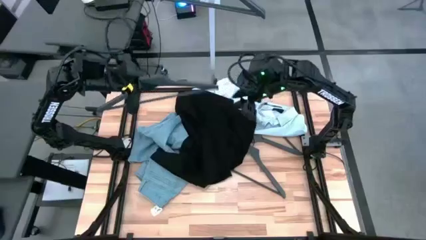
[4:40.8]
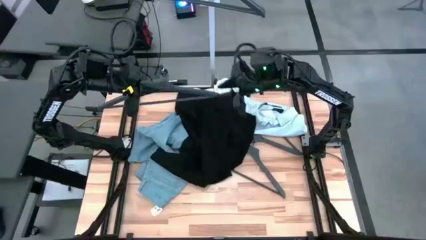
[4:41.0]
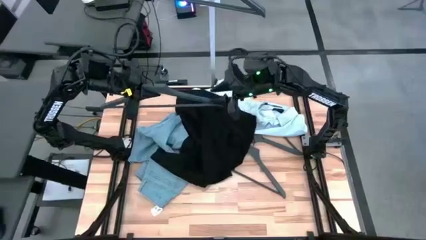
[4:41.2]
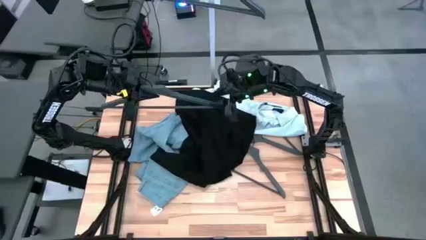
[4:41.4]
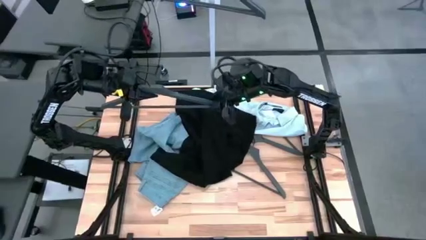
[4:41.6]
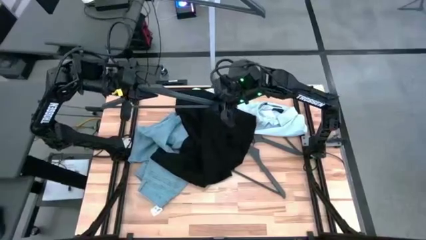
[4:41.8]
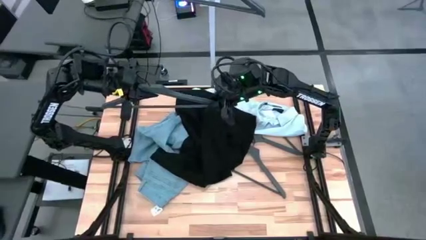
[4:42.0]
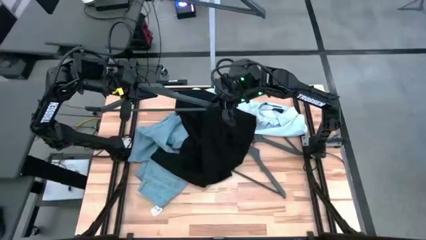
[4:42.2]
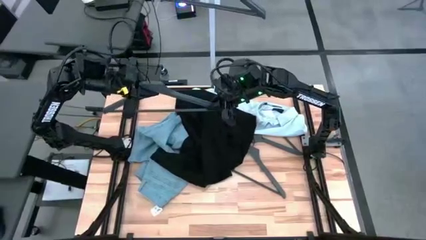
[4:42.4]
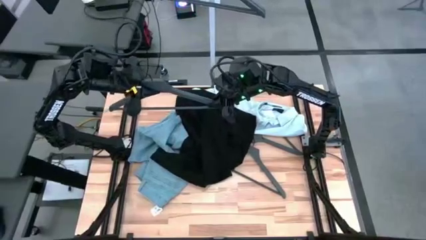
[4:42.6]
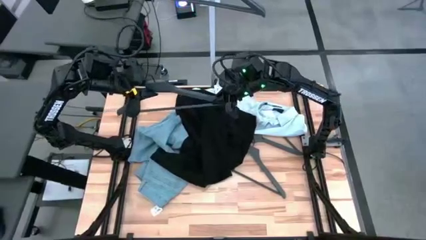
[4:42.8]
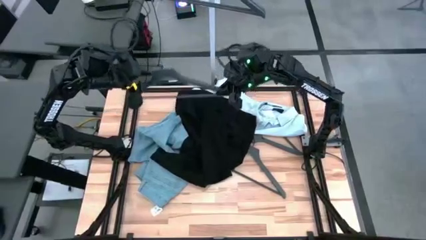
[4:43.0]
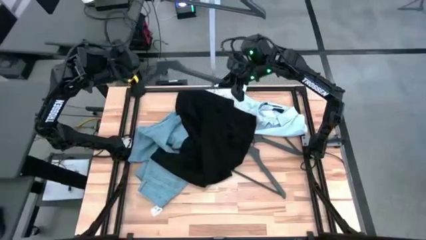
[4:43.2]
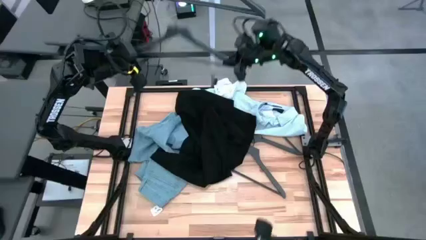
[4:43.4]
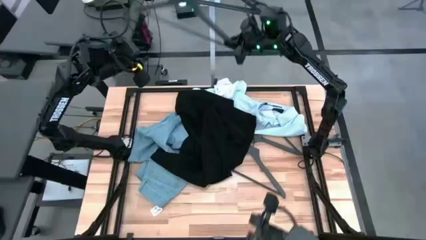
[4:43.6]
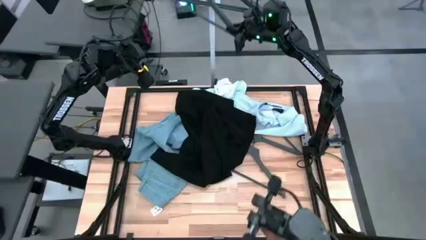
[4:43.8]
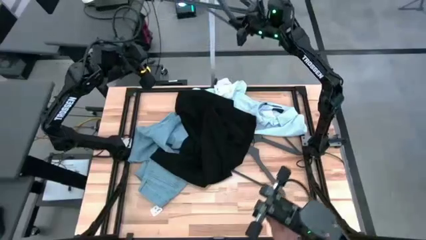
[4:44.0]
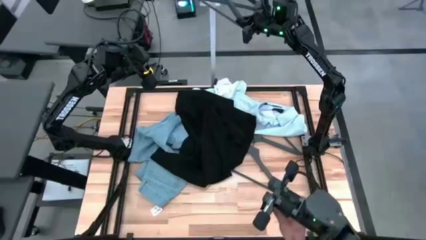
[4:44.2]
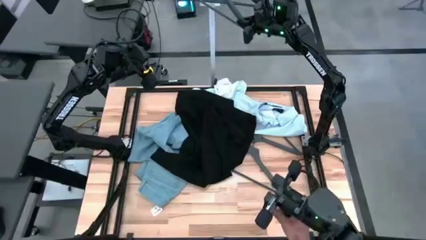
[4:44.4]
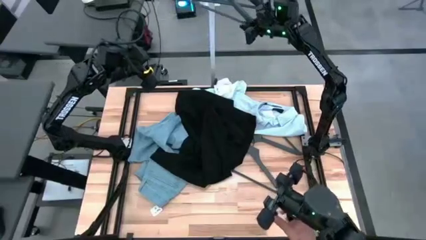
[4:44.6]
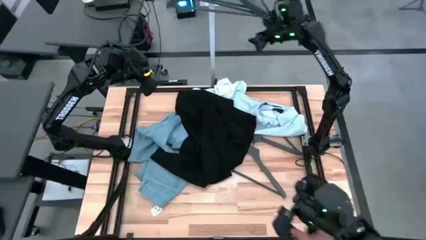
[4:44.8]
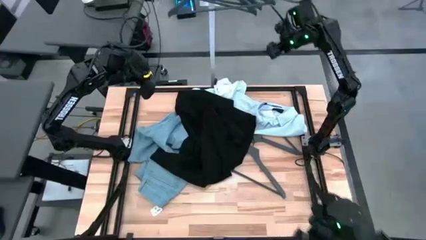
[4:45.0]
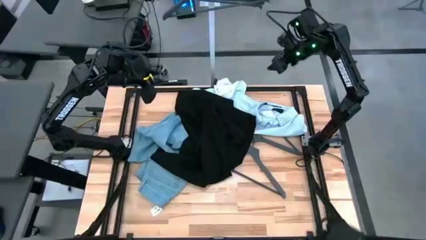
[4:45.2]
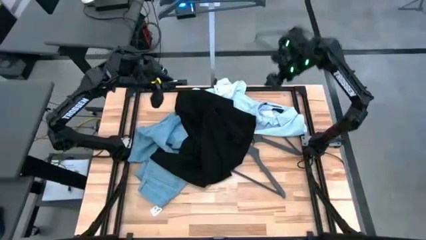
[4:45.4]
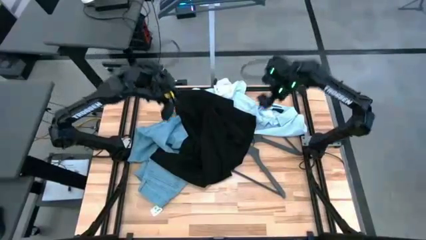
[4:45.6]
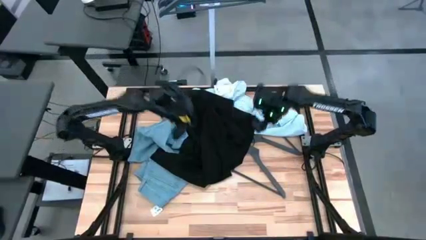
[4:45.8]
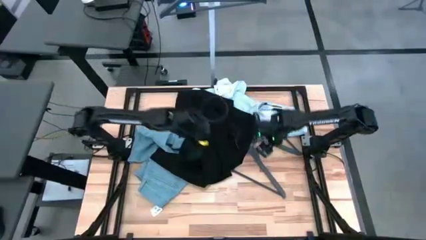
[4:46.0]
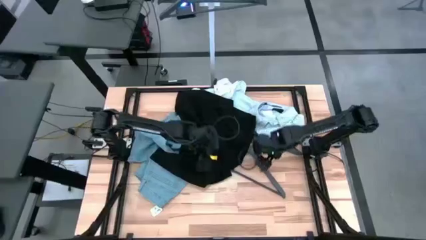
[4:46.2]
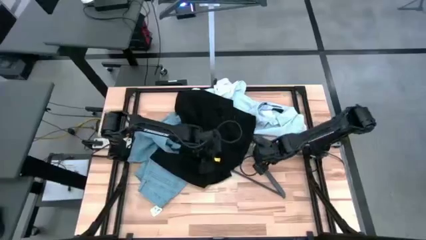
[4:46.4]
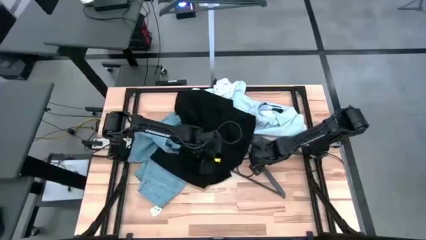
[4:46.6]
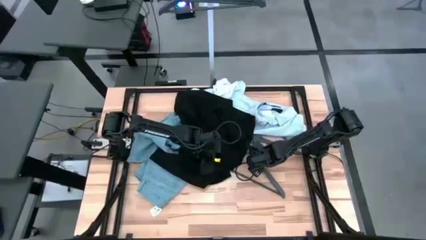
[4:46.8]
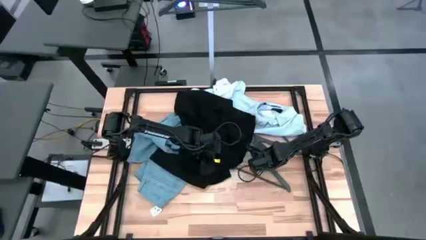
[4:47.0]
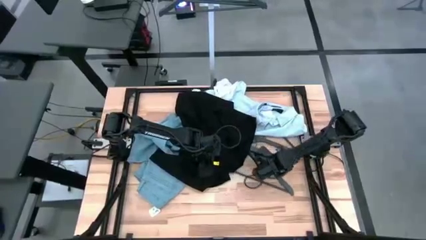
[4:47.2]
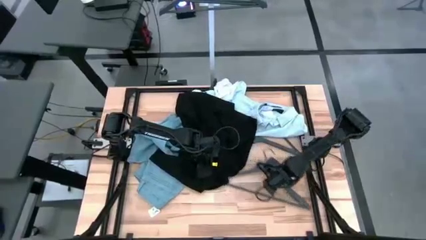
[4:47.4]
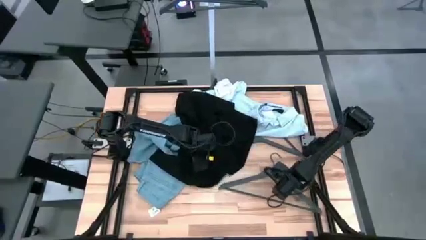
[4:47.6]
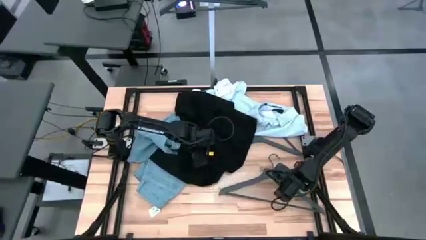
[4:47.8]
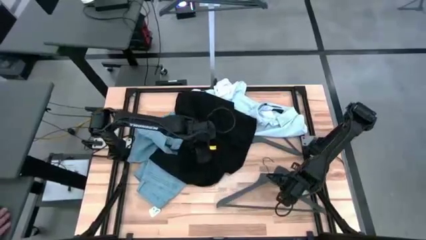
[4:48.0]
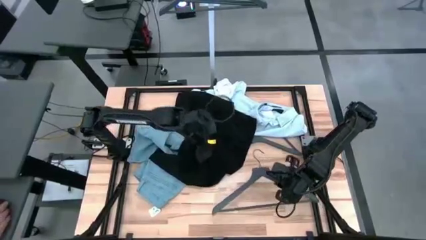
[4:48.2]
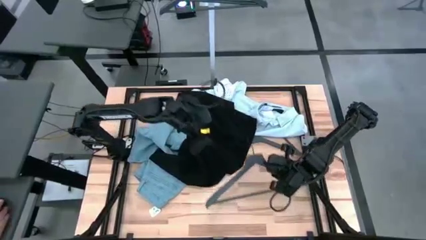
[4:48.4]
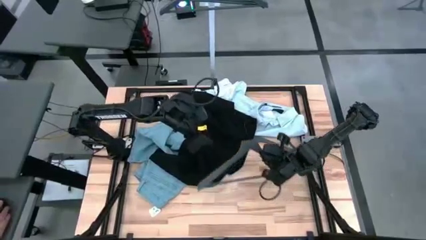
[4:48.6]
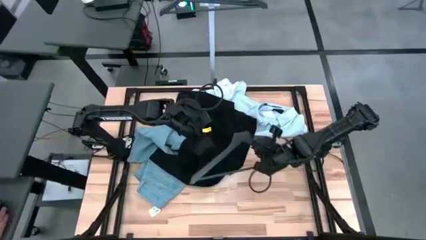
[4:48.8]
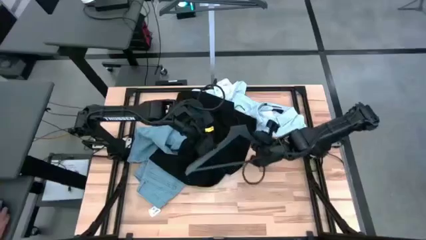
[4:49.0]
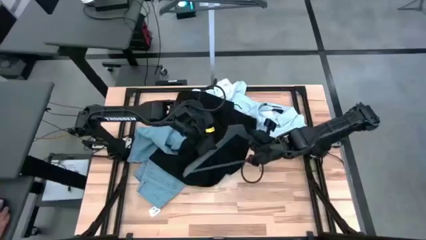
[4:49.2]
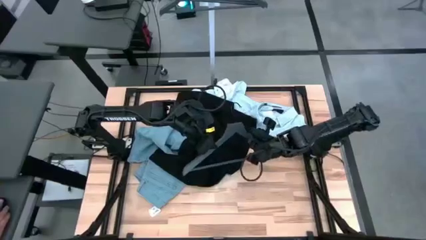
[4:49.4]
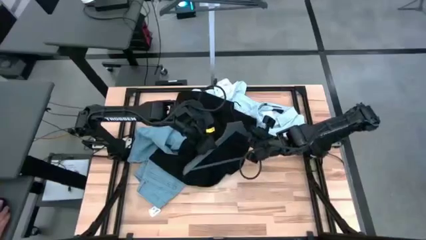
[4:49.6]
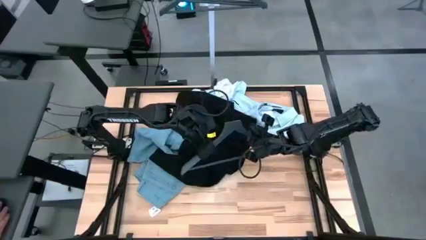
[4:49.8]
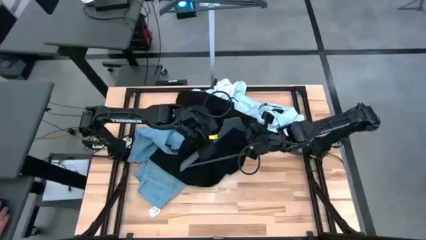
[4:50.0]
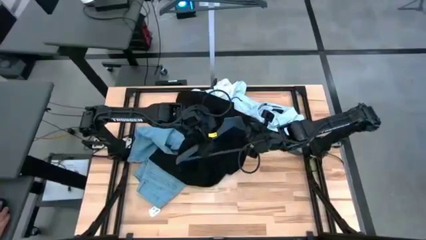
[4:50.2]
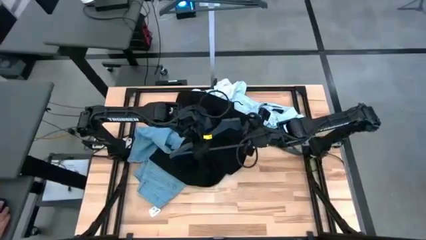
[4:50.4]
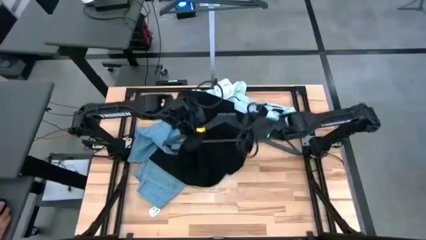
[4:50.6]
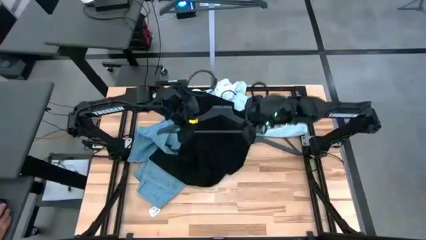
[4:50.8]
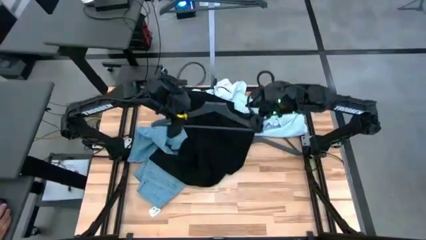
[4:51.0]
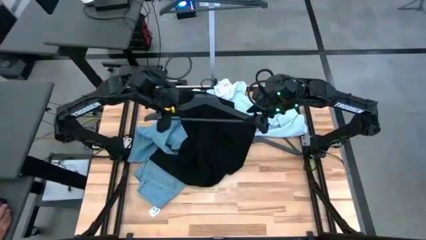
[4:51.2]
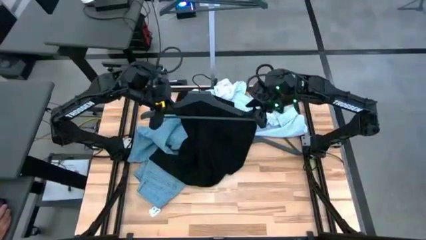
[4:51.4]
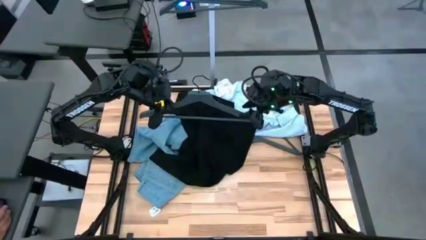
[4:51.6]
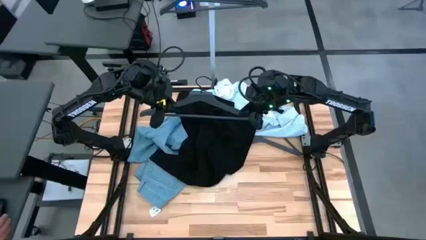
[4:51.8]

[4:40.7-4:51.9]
Task: Hang clothes
Hang the grey hanger on the rack

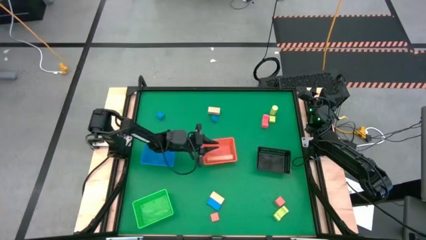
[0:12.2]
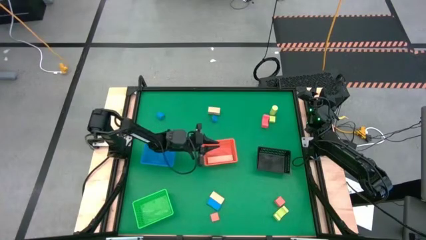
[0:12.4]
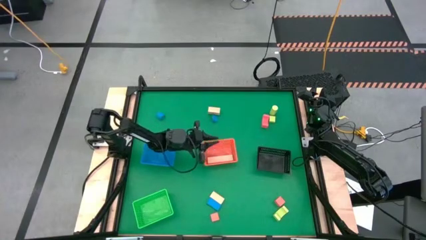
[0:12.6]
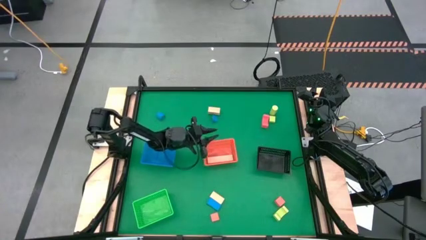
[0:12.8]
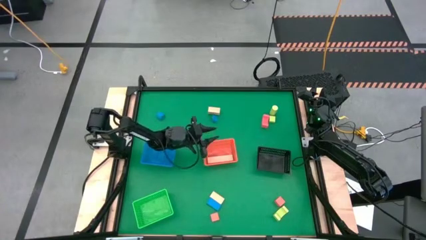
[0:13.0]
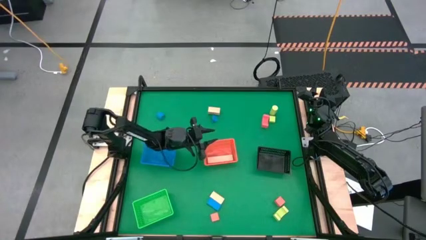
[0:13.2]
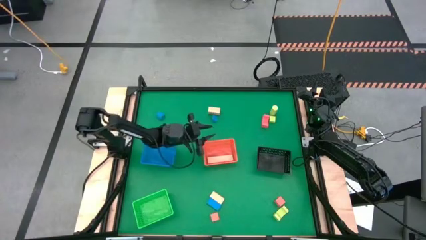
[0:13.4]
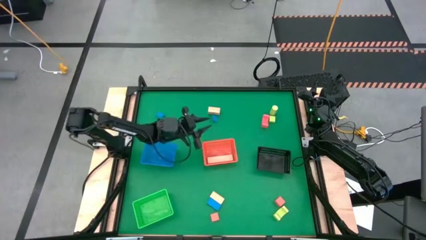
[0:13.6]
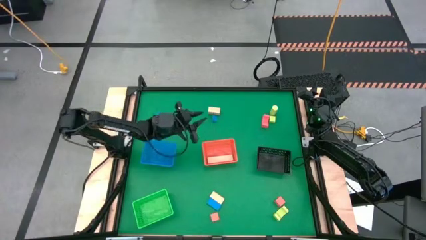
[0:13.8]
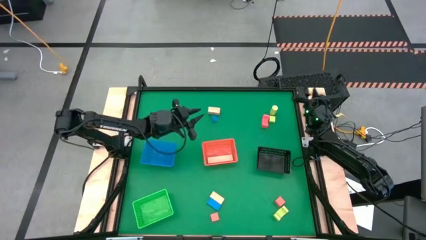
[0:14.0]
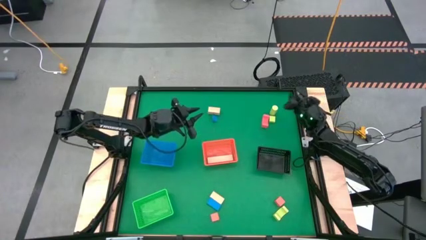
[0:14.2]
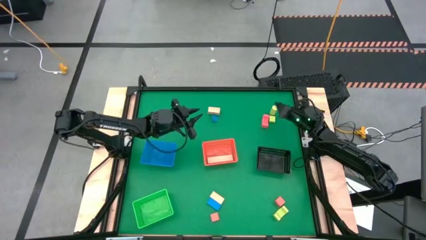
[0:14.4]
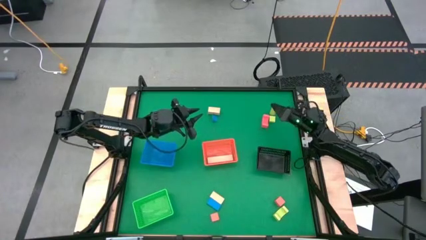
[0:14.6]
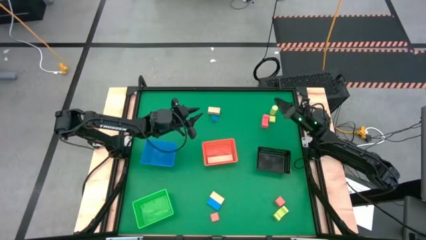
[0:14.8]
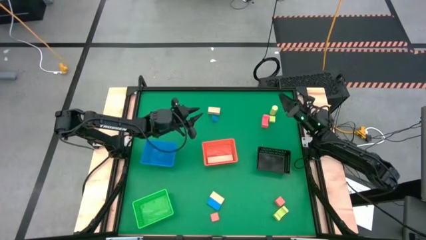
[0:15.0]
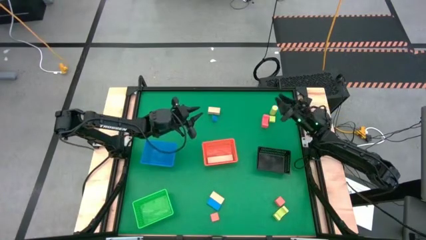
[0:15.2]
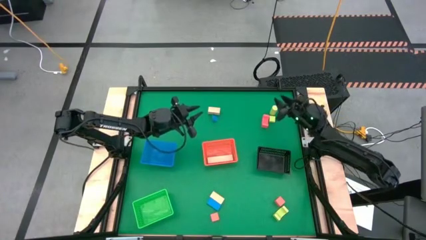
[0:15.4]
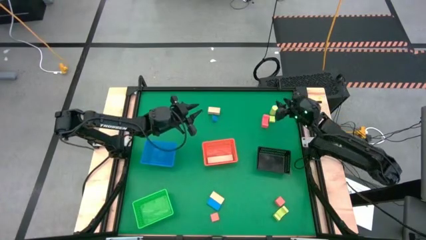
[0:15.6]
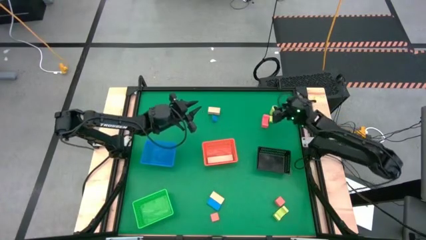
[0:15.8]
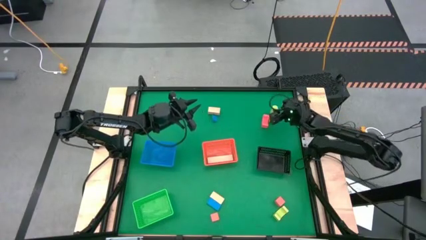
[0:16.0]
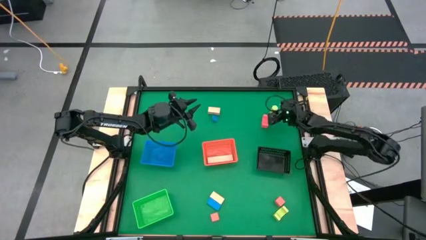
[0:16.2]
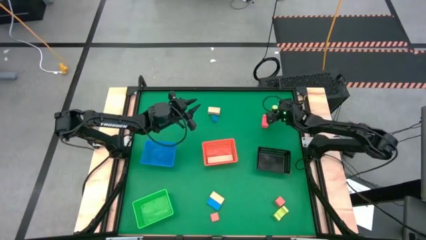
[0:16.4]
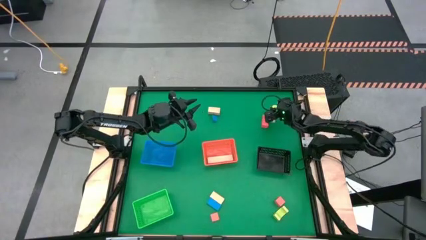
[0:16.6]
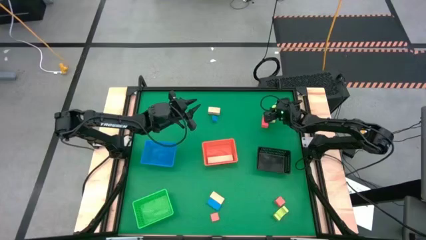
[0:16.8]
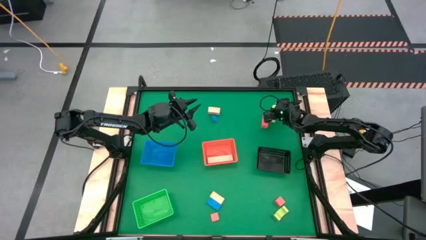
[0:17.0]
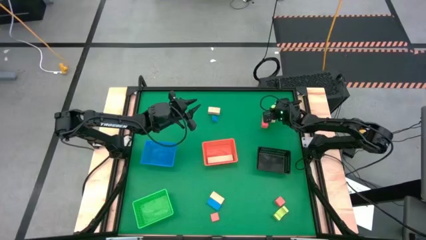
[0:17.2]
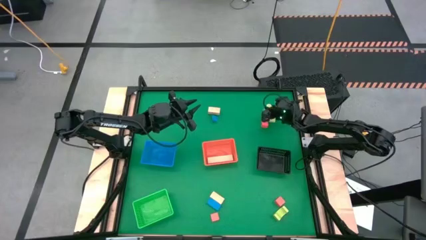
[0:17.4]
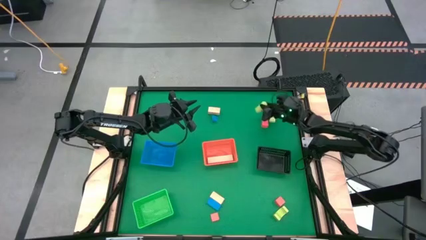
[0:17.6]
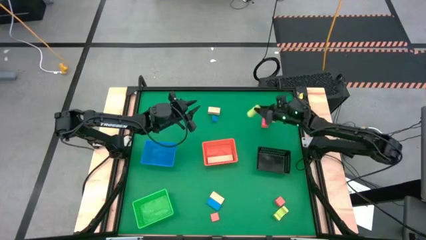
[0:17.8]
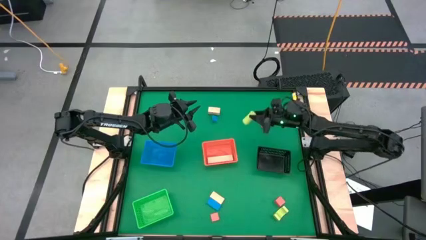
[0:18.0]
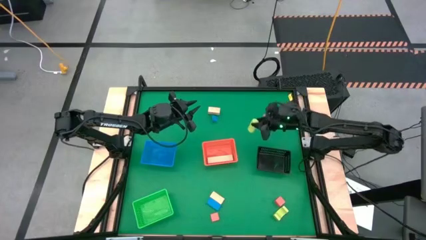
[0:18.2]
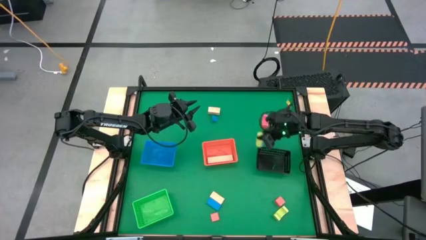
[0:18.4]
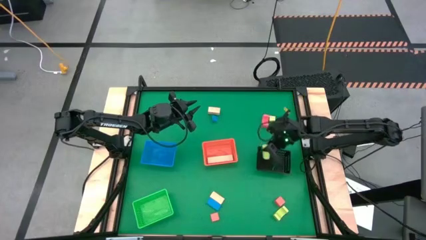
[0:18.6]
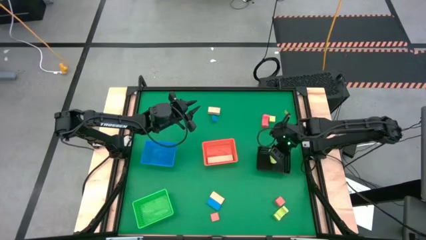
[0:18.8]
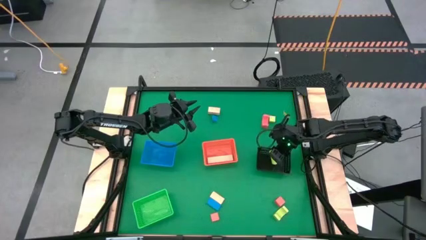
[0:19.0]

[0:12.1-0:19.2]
Task: Sort & place blocks by color
Put the top green block into the black bin
